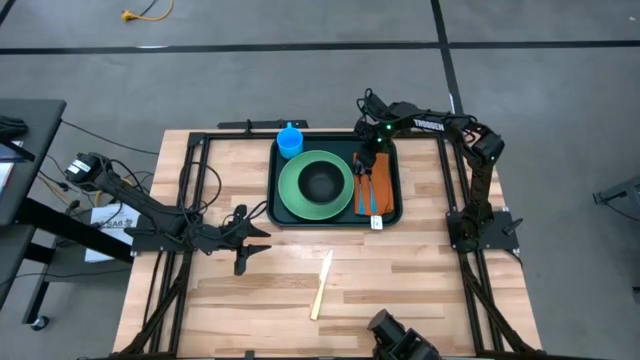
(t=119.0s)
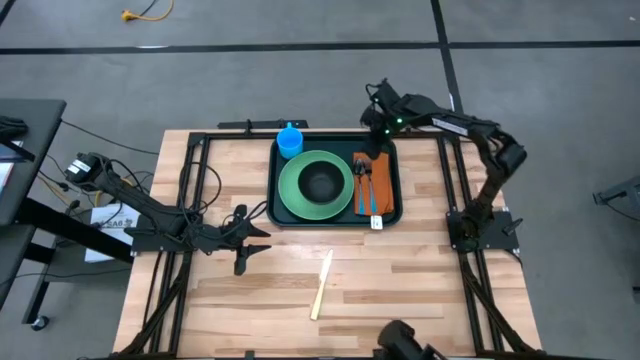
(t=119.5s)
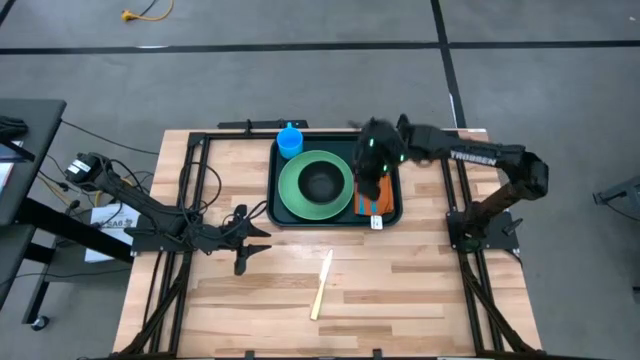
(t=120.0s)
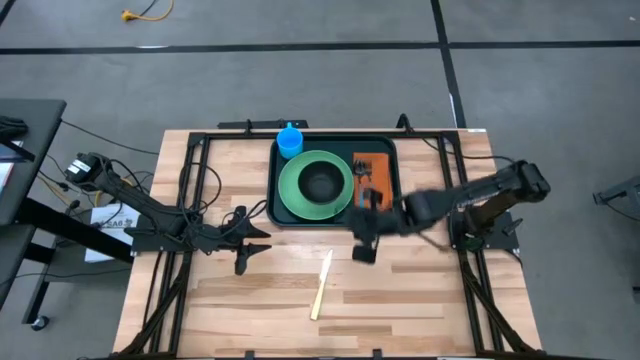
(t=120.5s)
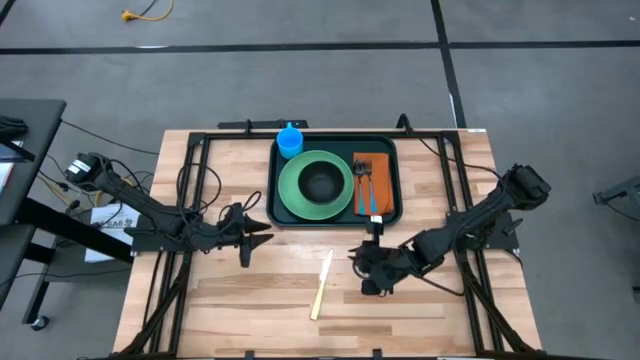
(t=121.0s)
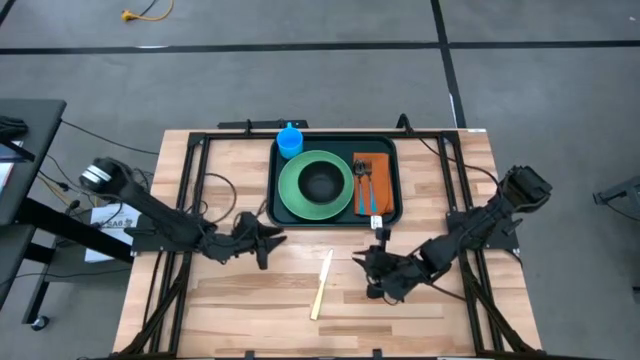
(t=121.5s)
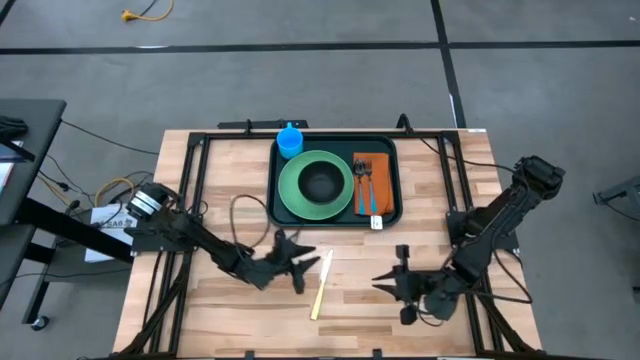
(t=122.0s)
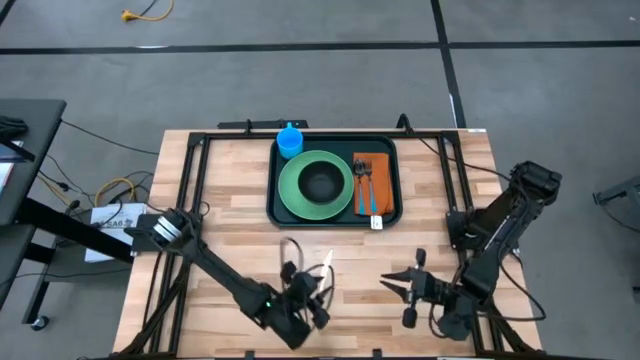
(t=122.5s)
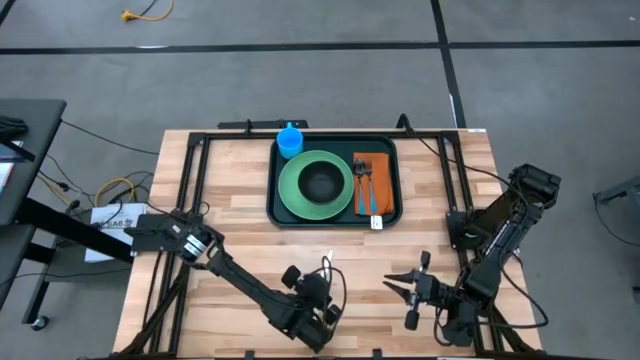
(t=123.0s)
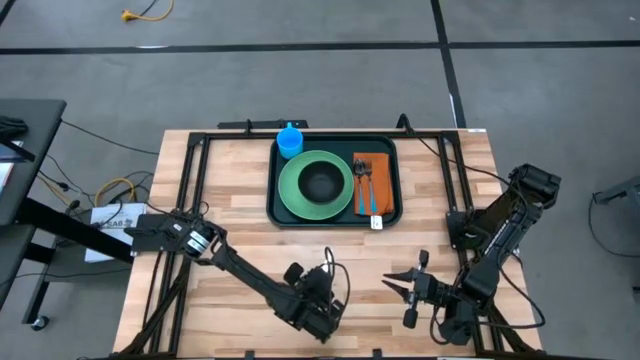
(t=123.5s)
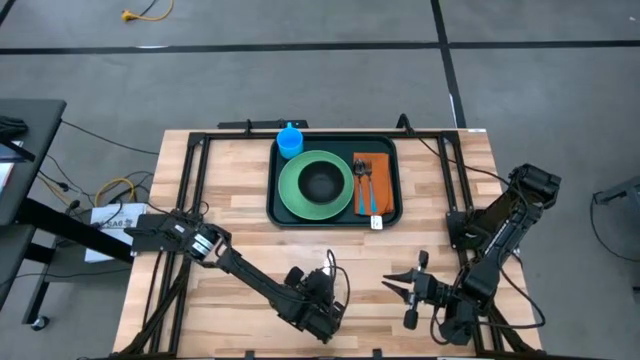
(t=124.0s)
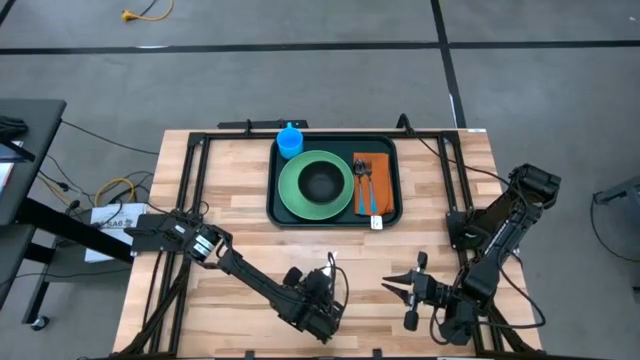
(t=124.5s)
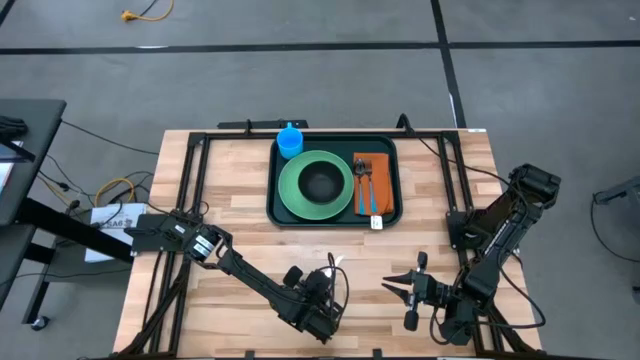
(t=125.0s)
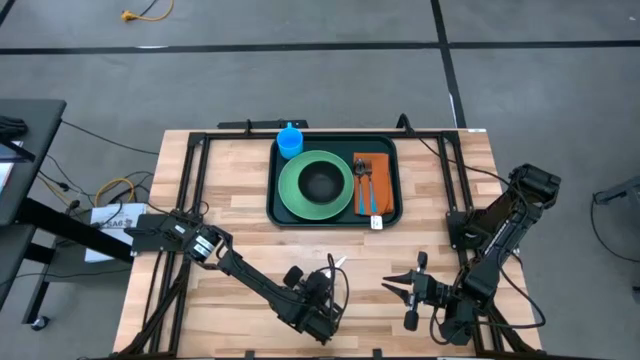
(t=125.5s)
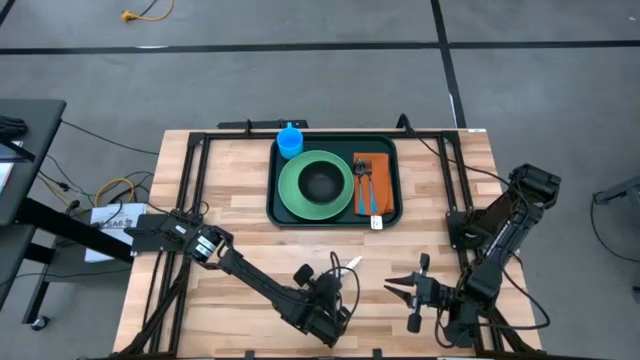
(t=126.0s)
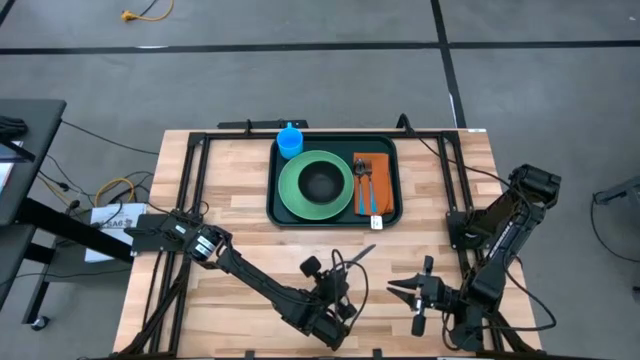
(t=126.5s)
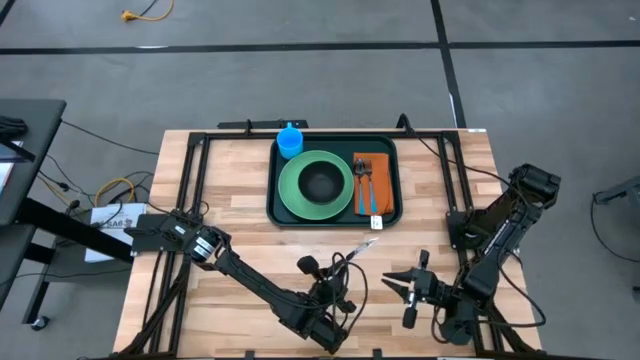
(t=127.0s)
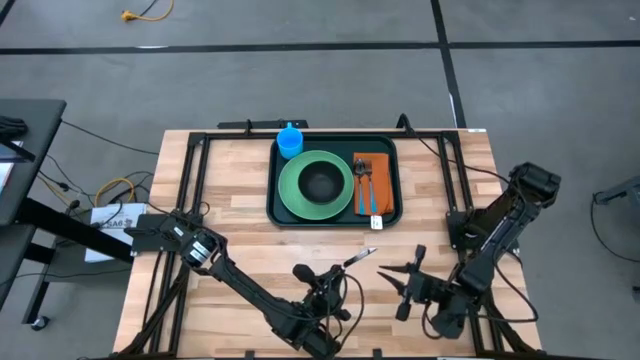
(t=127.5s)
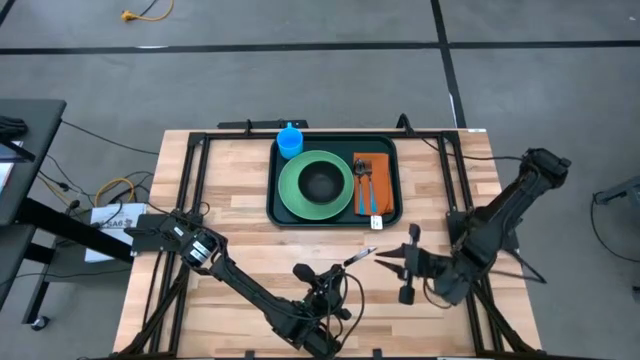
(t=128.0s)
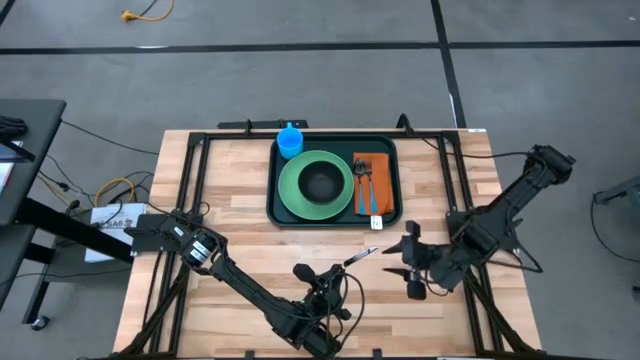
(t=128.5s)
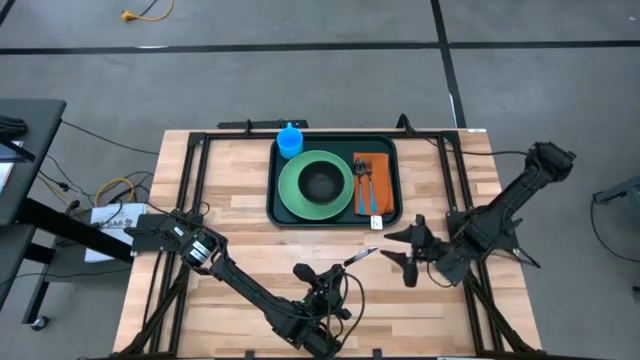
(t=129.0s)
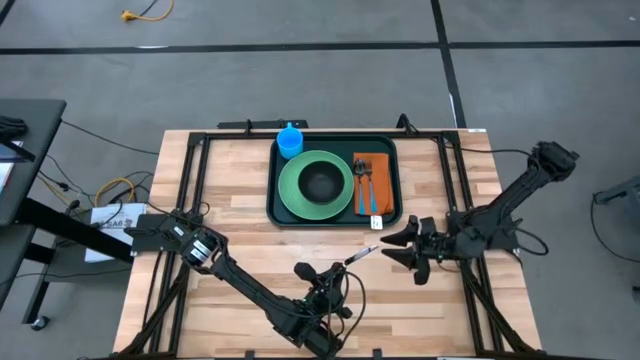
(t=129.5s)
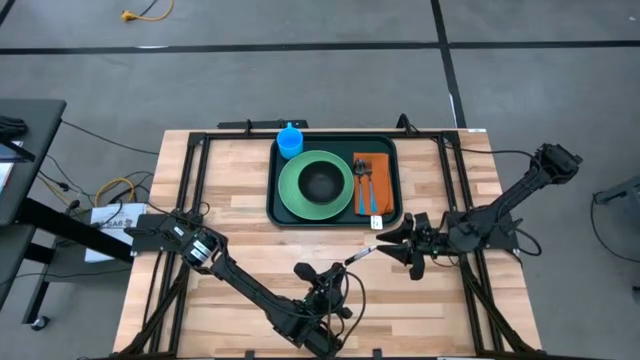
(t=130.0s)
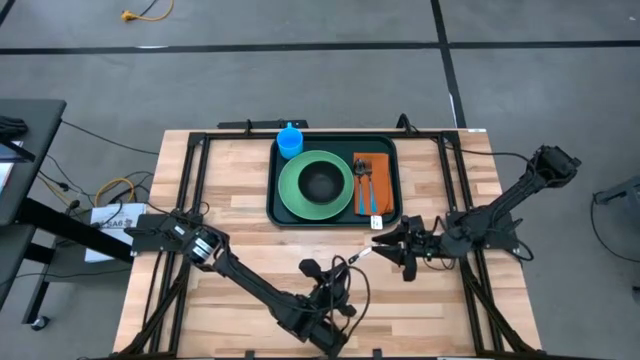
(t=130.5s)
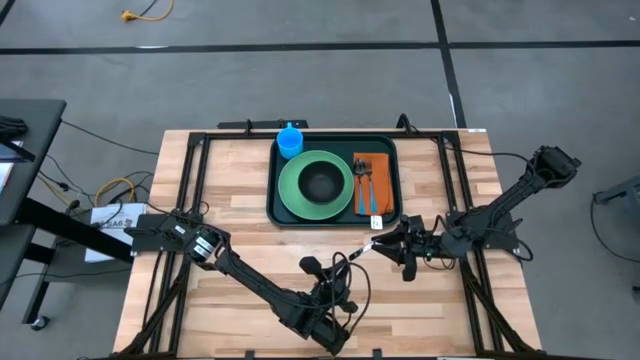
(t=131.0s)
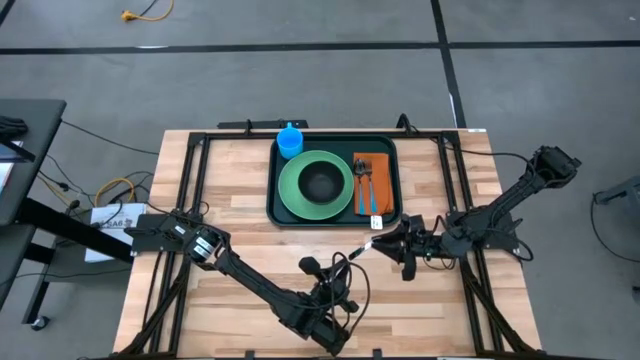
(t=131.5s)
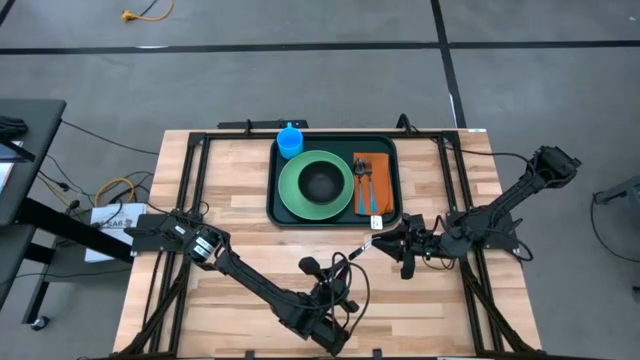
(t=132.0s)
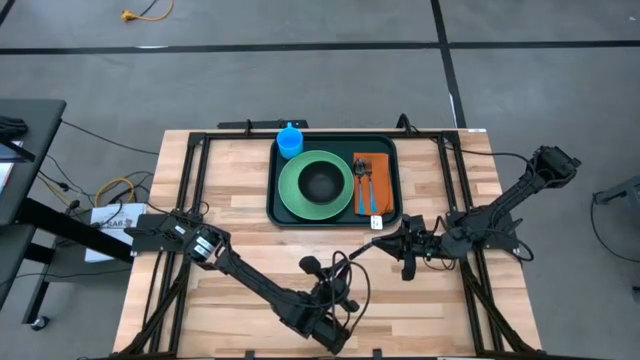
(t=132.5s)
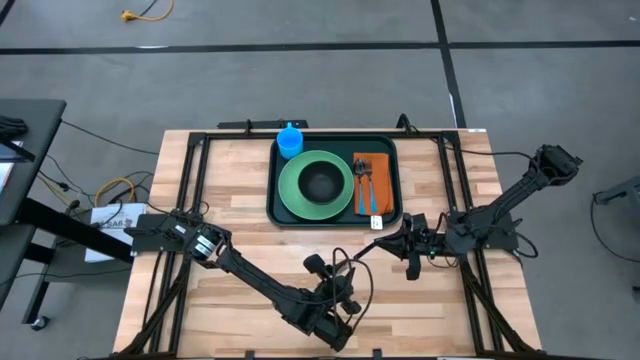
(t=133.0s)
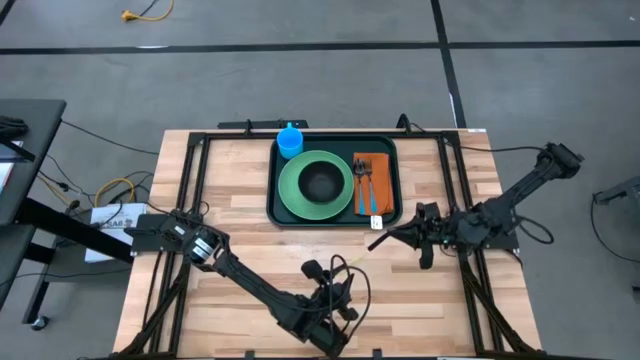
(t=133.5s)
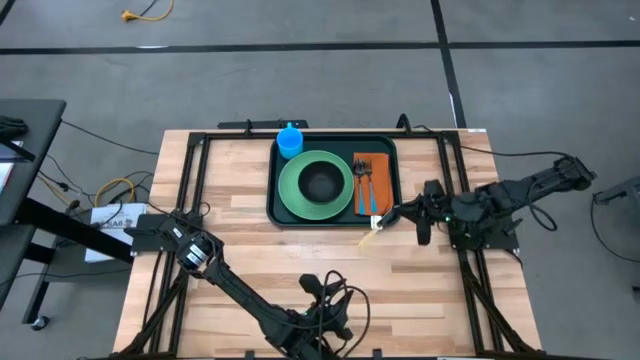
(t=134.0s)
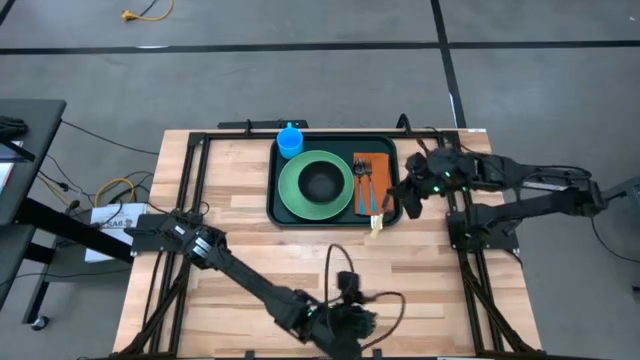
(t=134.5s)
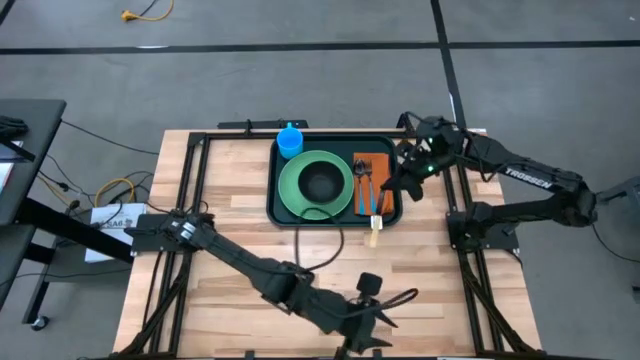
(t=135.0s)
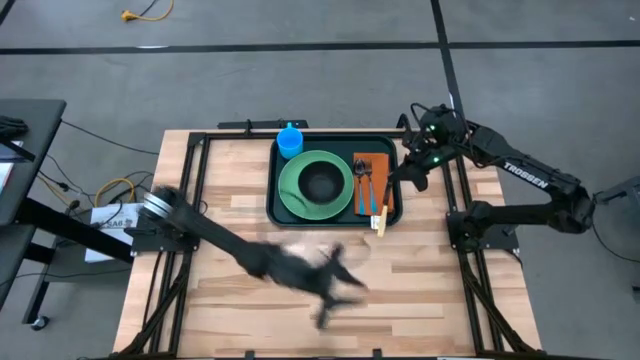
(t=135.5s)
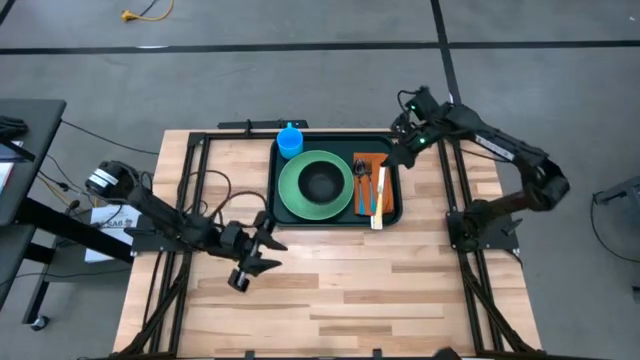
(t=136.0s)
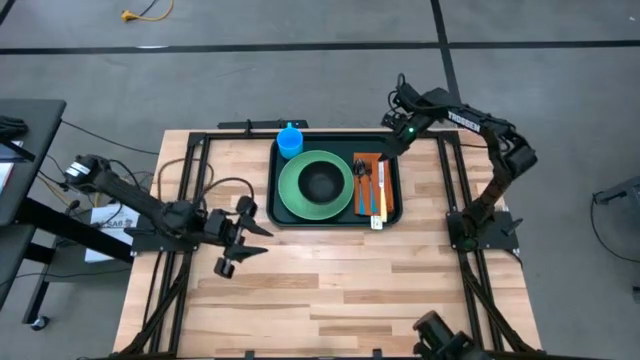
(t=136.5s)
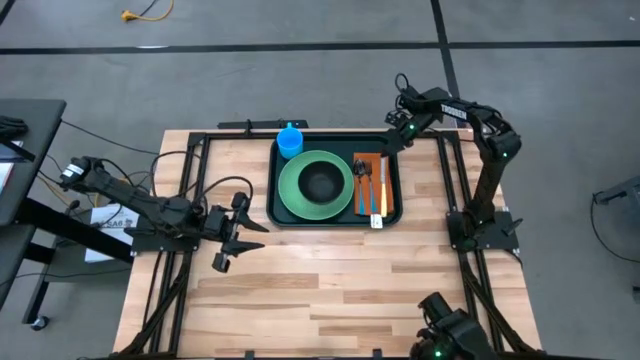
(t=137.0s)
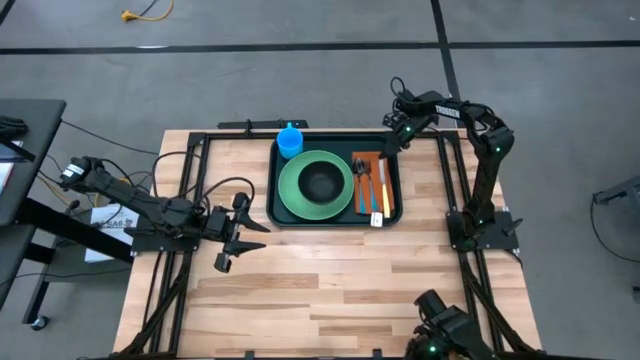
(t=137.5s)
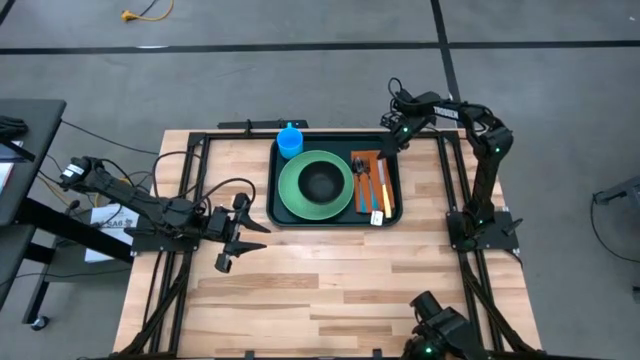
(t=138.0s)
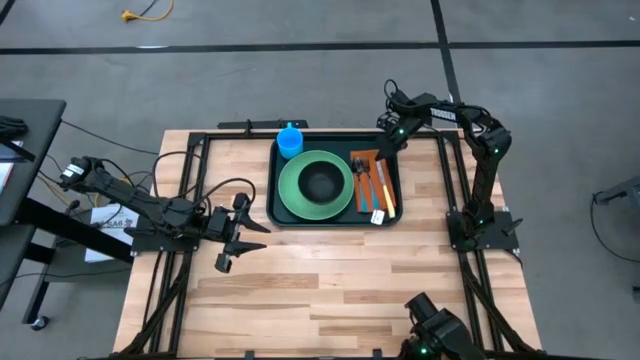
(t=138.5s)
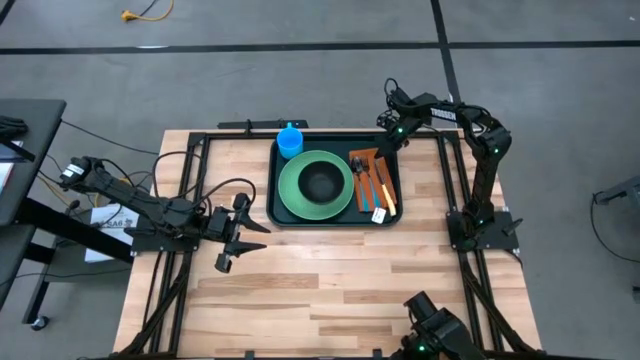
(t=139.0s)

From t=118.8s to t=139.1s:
Task: Set up tray
Put the yellow table knife beside the blue fork on the brown table napkin on the black serving tray

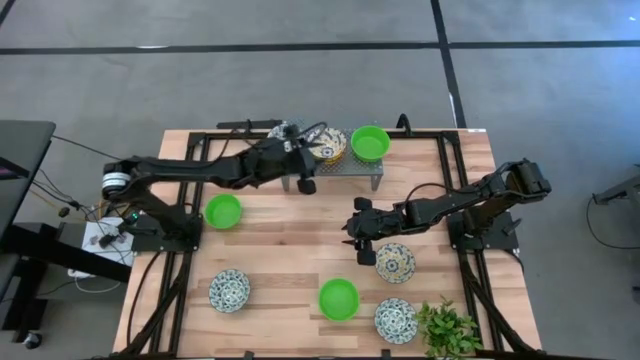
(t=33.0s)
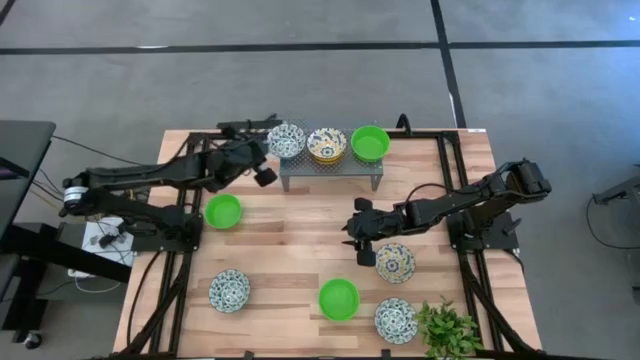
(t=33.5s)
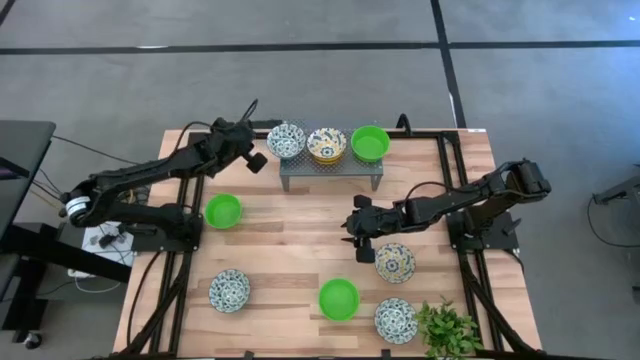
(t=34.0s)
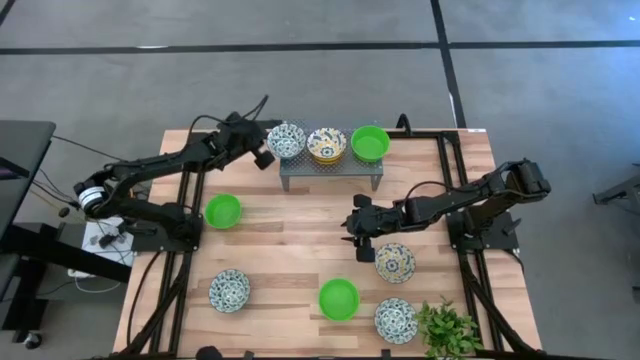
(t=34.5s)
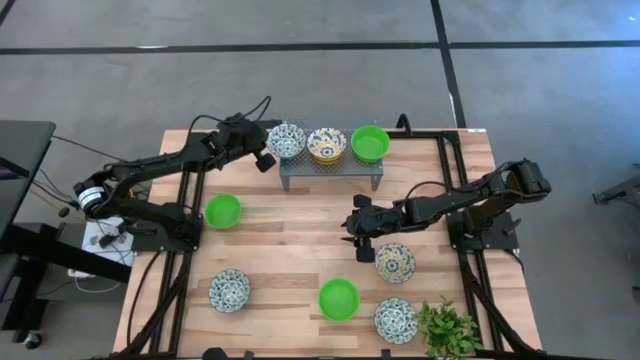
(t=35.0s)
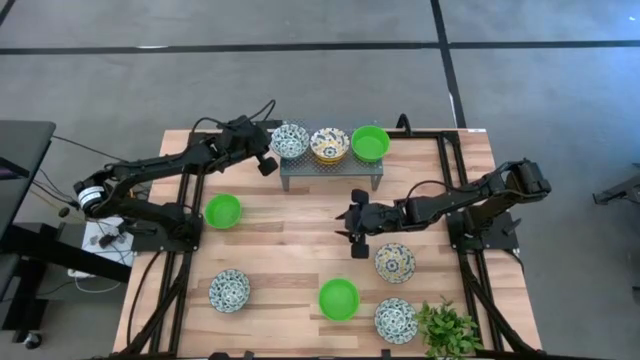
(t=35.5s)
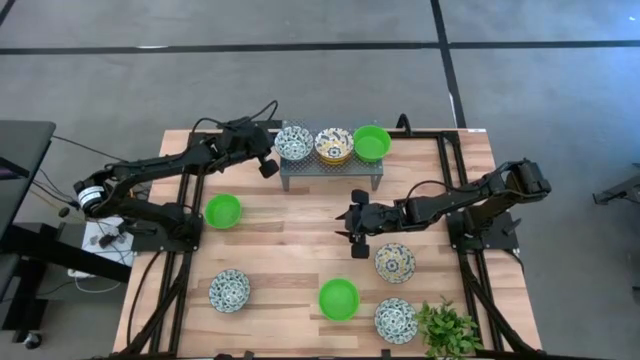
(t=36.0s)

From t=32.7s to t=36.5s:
Task: Pick & Place Mini bowls
Adjust the bowls on the shelf
